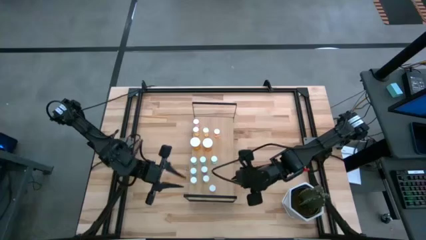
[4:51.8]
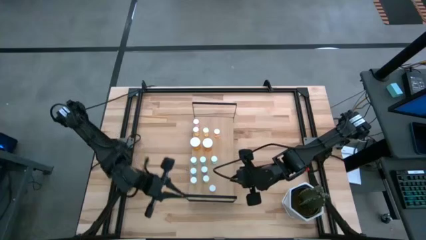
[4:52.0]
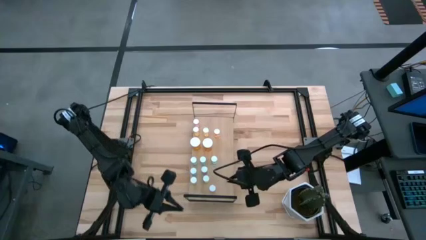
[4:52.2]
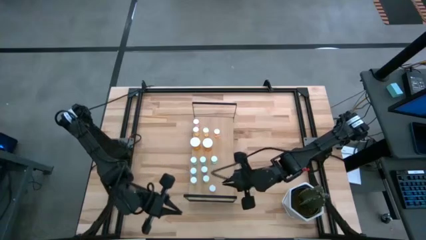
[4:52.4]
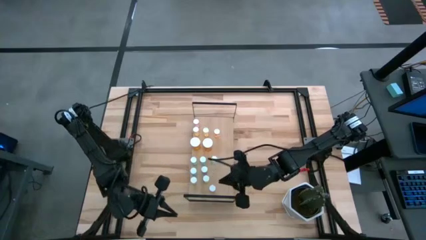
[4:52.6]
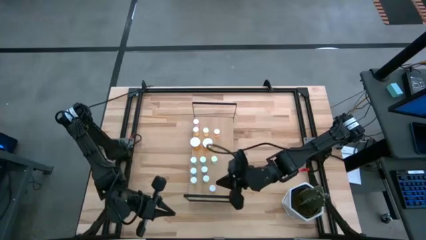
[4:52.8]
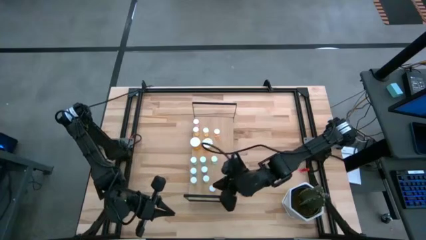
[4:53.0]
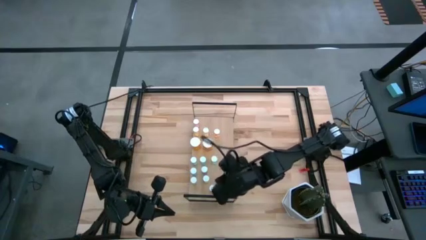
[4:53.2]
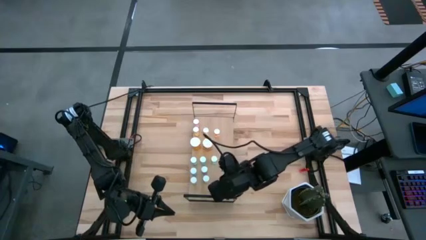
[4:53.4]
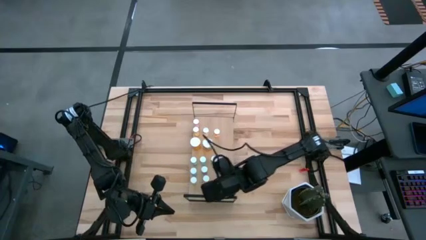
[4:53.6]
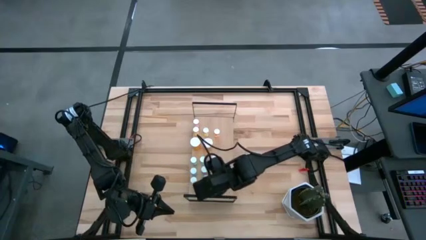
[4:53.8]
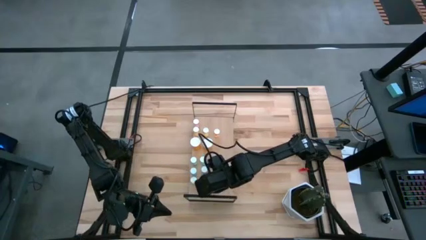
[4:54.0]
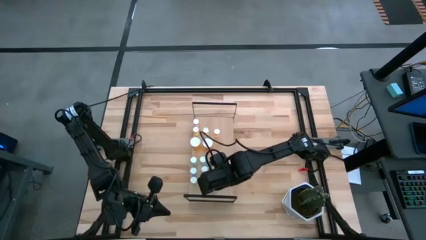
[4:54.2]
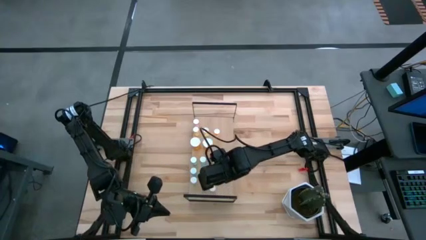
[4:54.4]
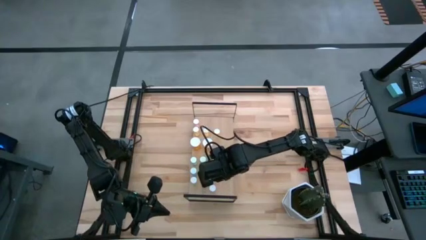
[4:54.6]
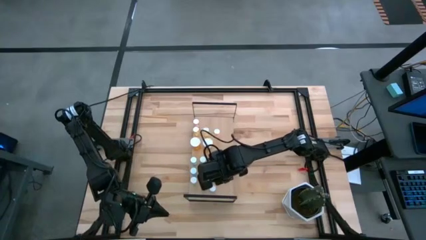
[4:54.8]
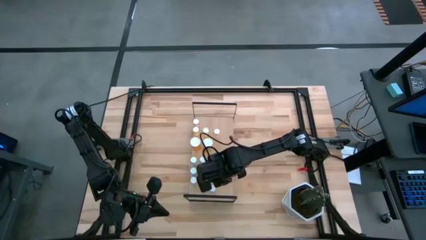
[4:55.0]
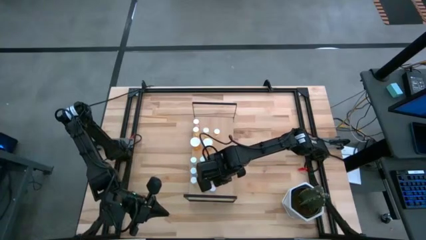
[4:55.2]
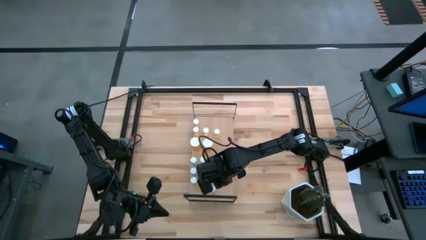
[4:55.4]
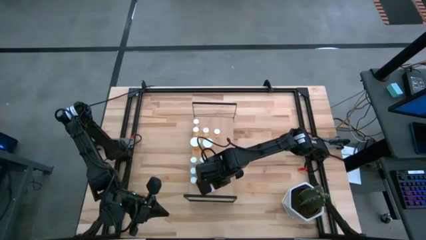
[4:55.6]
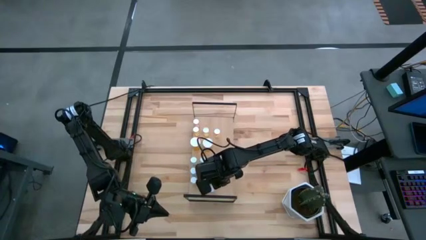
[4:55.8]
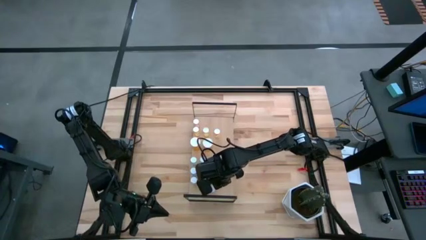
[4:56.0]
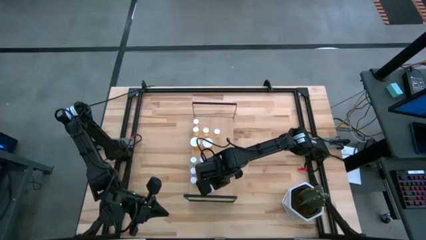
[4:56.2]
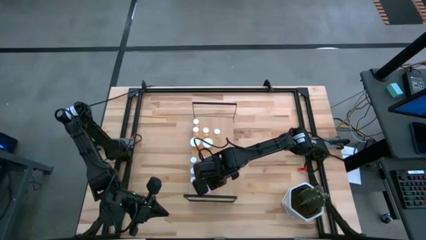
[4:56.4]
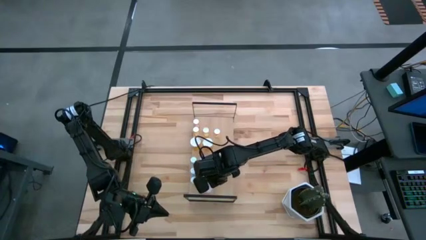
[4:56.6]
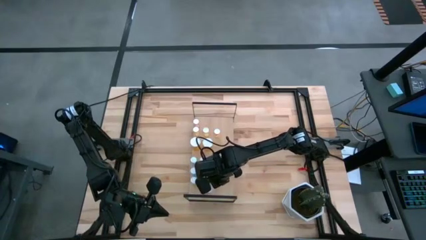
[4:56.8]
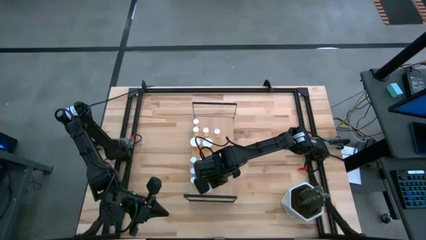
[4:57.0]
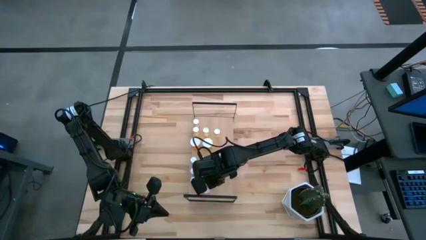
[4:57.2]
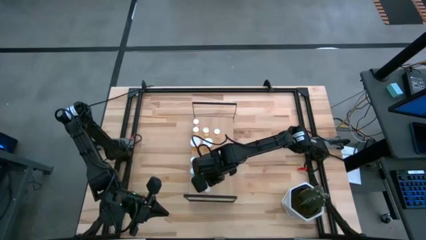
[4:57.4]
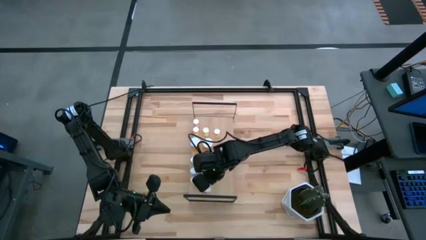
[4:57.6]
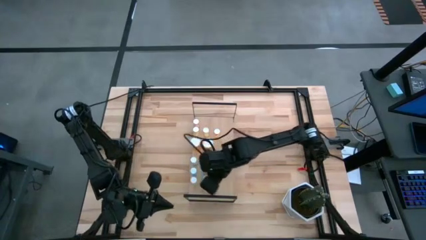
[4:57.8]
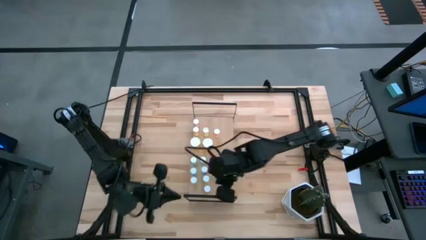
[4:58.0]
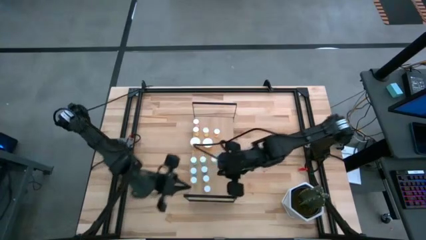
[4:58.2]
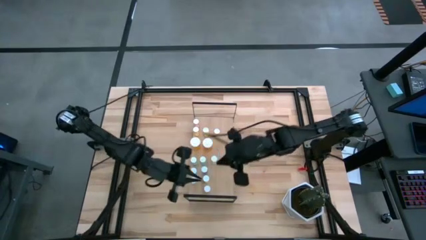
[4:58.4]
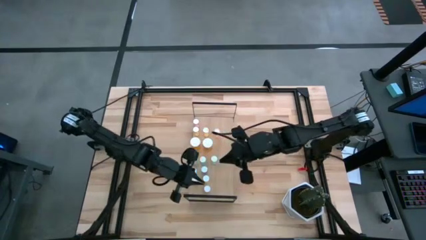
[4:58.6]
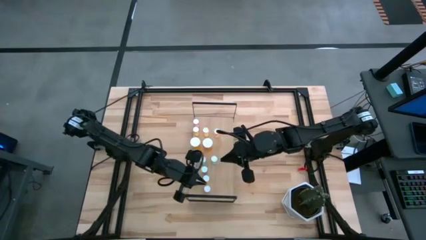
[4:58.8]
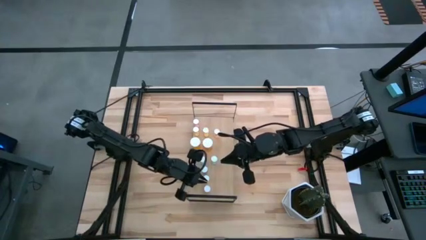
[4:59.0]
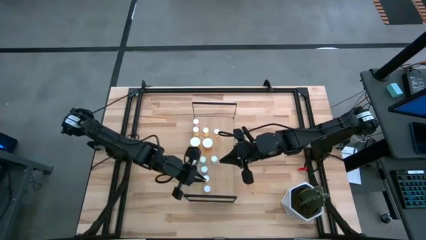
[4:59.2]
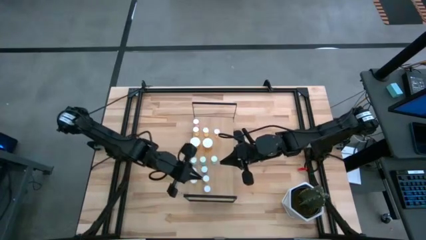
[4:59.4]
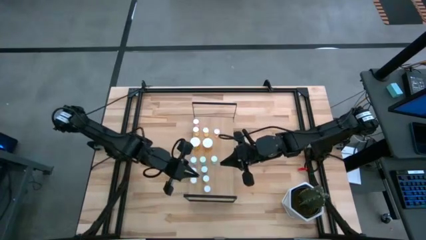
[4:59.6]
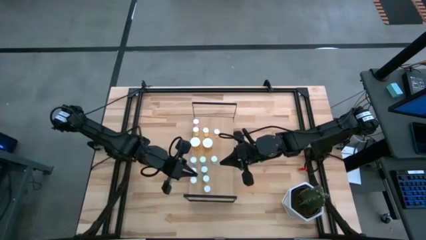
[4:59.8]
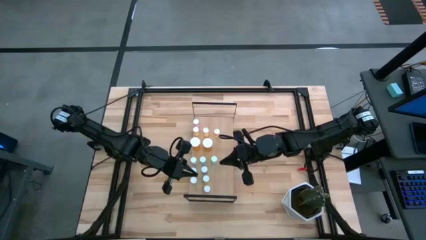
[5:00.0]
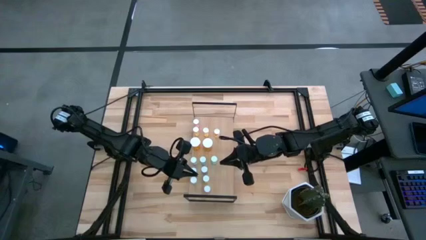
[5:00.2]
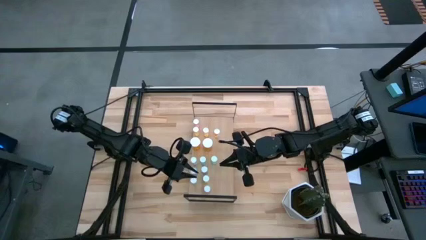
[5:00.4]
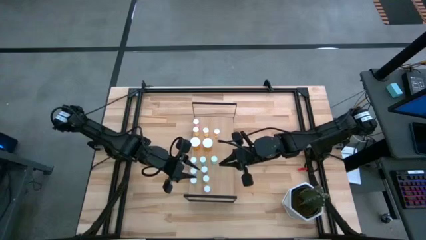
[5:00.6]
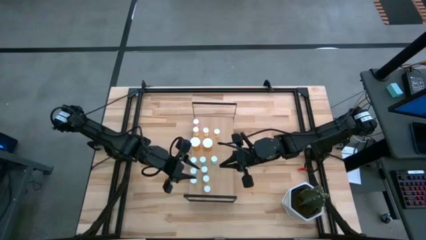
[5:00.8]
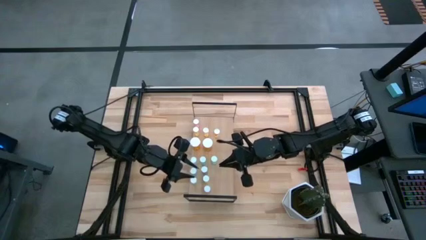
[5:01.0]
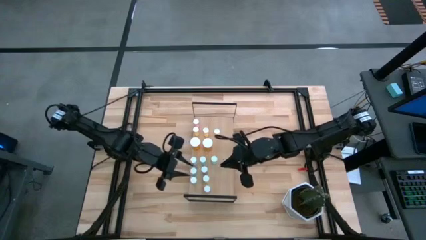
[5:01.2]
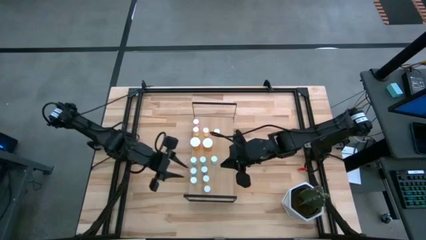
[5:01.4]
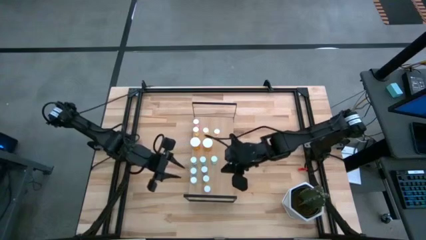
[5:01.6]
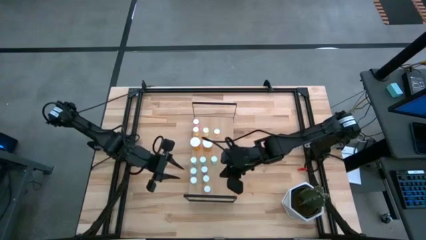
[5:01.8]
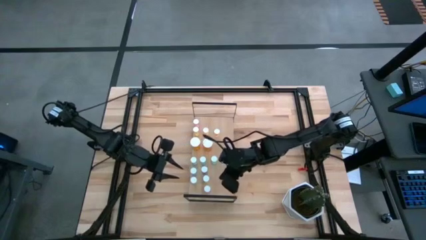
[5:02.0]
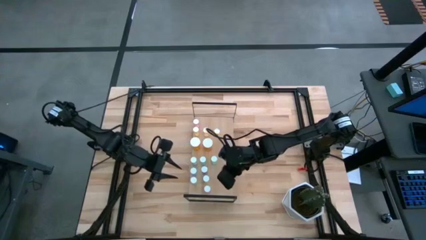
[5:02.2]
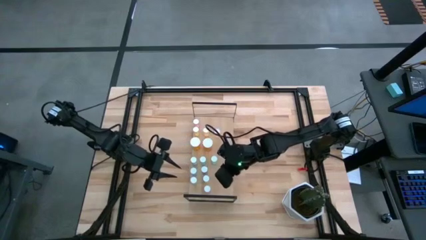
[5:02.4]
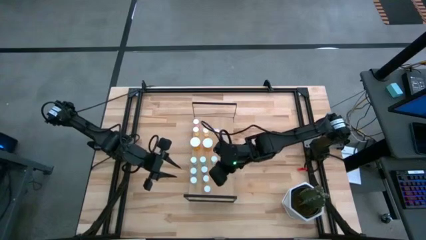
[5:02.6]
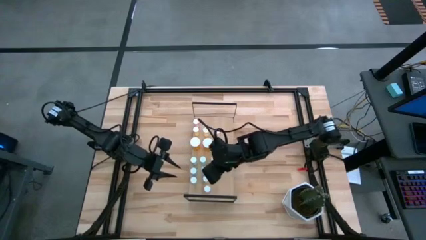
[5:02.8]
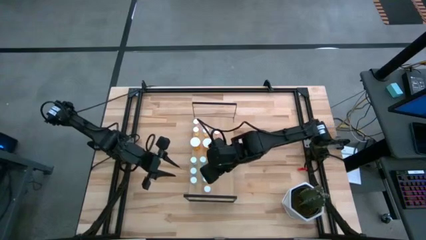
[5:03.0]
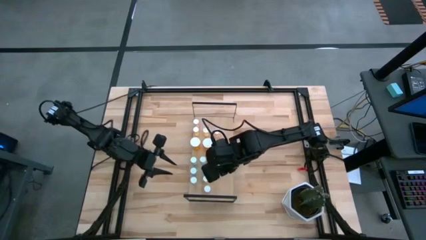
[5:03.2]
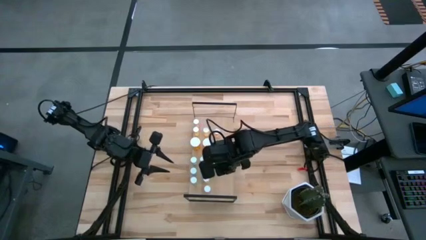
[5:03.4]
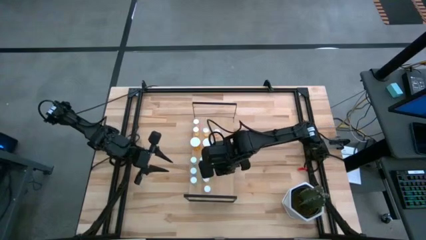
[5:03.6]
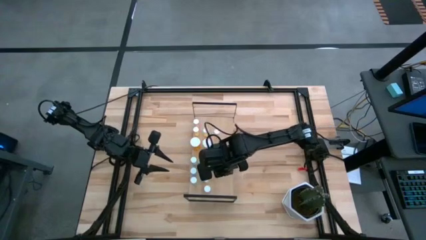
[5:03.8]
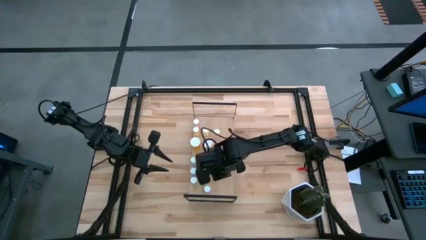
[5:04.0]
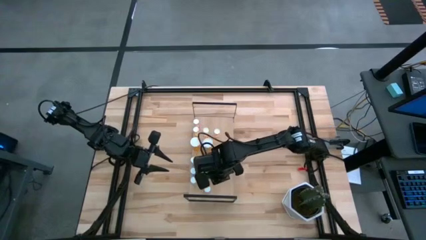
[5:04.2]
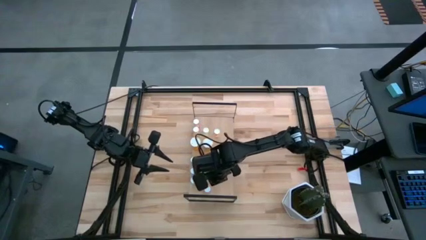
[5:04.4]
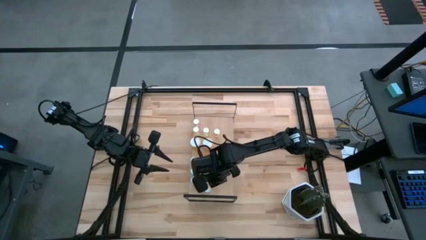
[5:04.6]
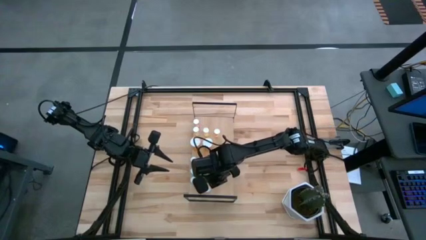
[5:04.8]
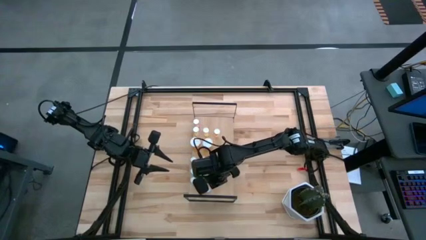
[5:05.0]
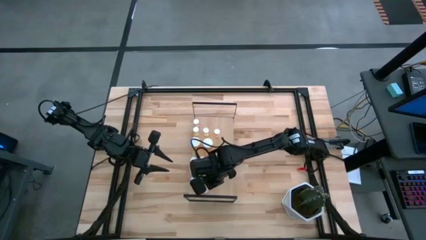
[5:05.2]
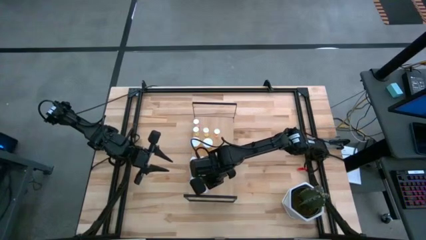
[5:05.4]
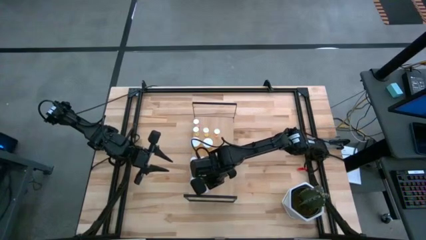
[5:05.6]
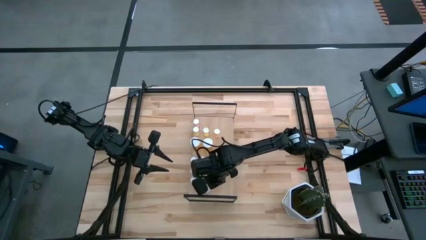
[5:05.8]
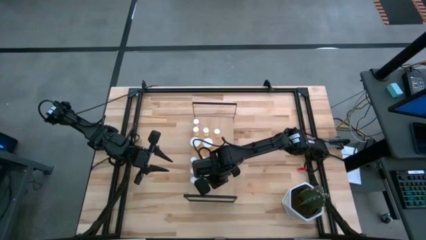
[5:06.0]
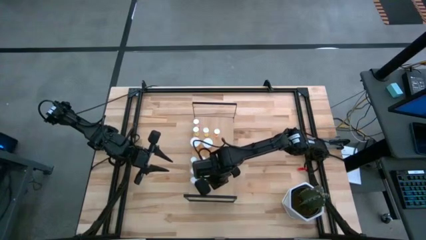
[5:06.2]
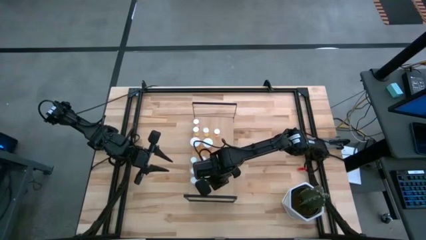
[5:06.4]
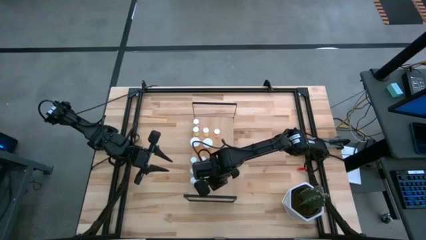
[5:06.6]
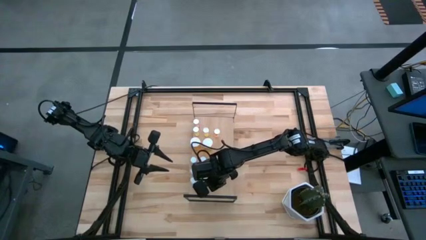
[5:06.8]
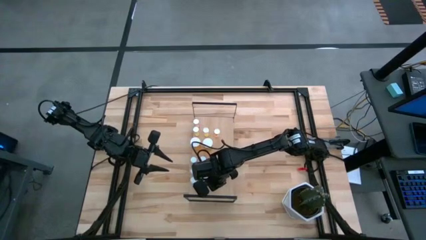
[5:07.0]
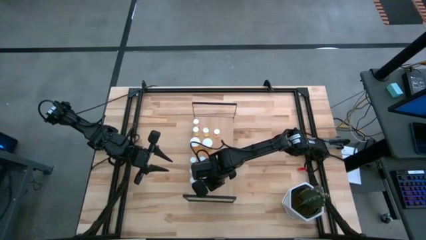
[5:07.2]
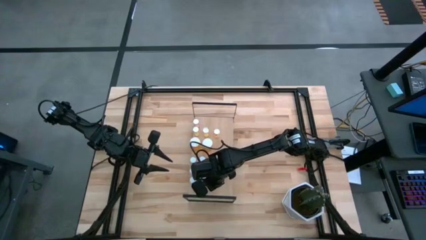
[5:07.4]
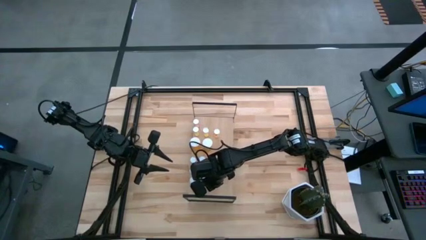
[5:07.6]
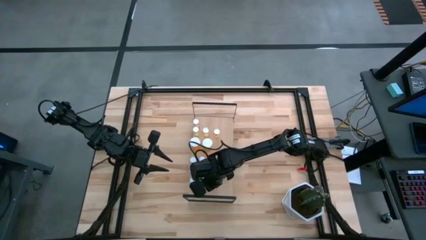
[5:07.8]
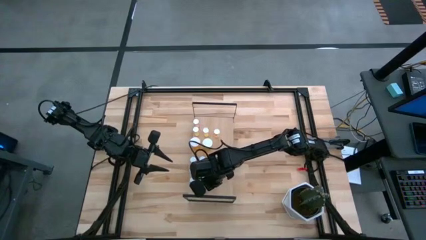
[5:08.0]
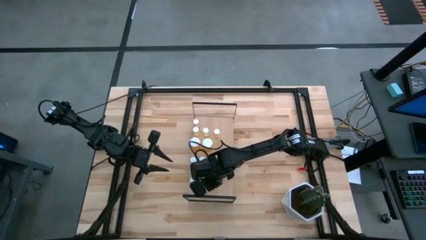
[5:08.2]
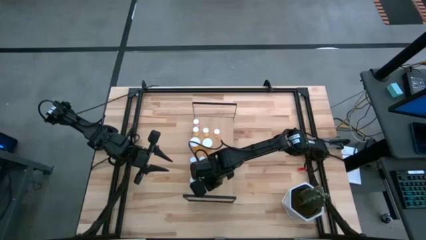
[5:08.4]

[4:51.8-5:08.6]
Task: Pick and place medicine bottles onto shelf by color
Adjust the pill bottles on the shelf
